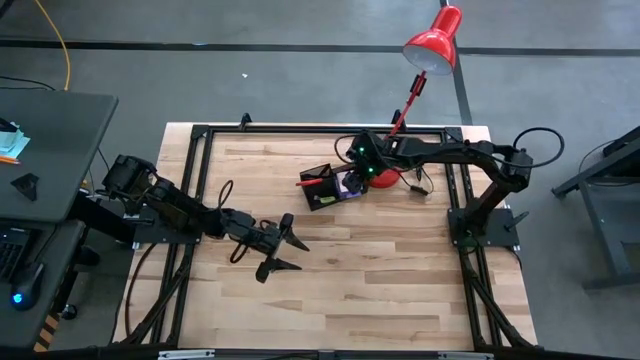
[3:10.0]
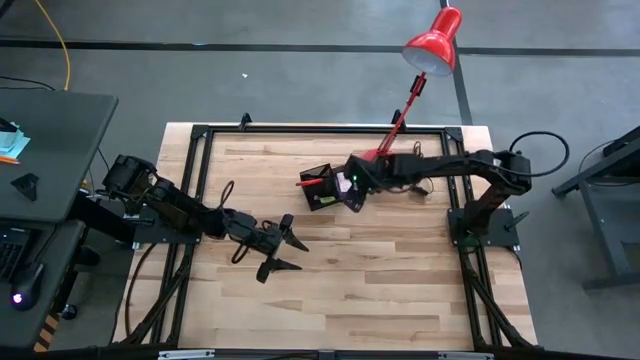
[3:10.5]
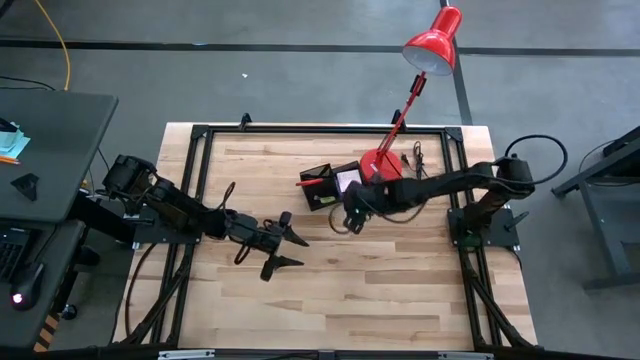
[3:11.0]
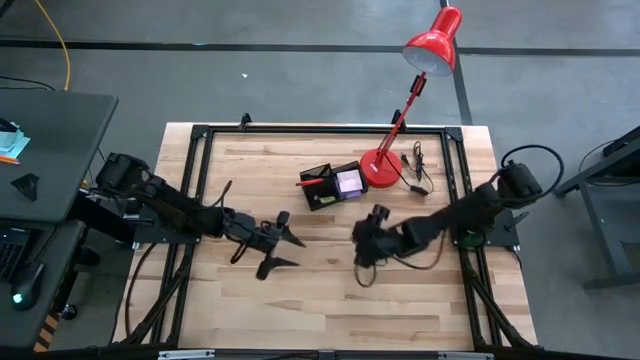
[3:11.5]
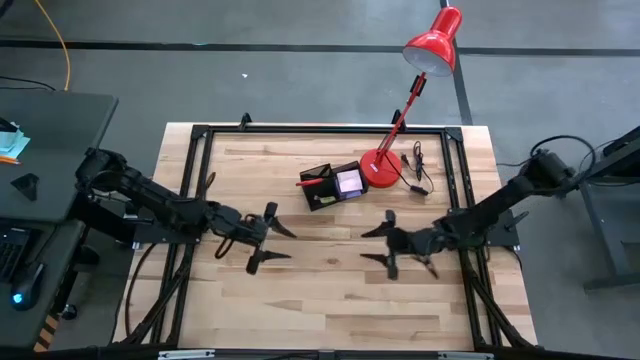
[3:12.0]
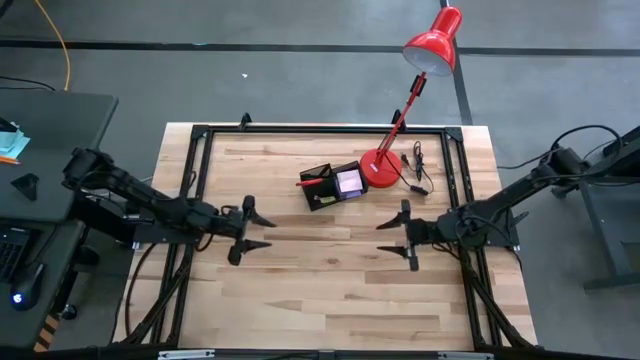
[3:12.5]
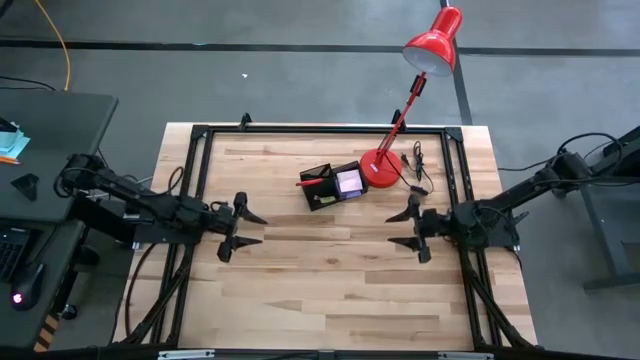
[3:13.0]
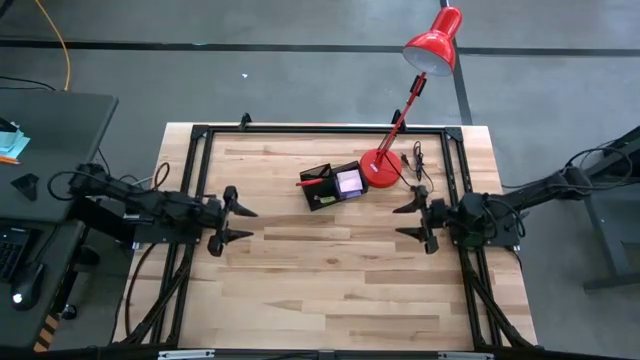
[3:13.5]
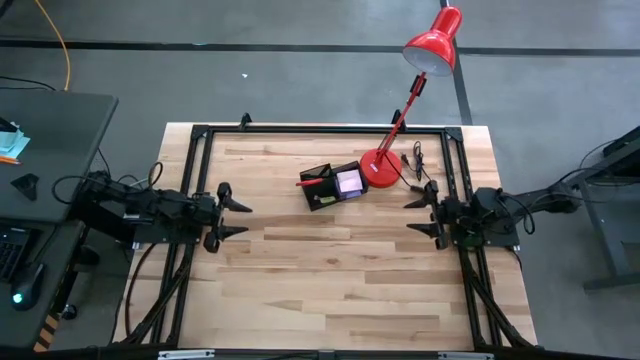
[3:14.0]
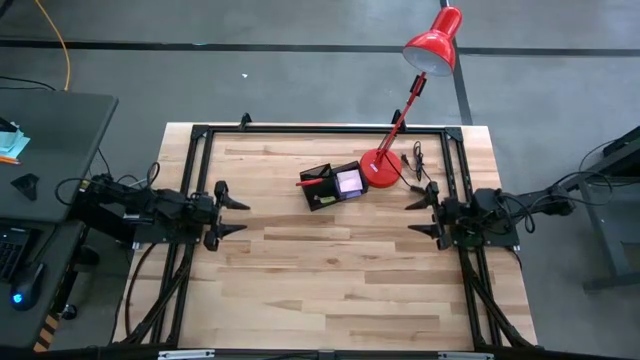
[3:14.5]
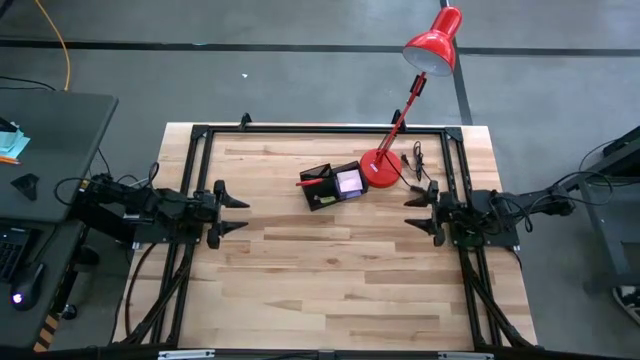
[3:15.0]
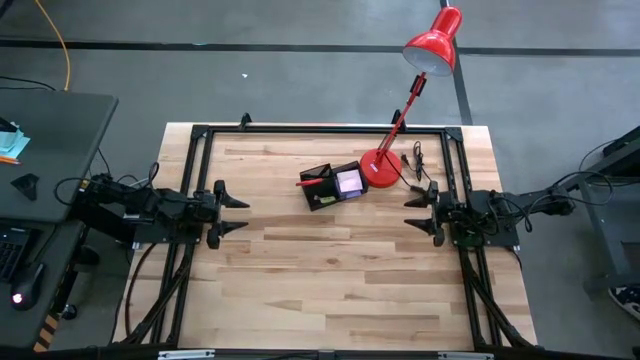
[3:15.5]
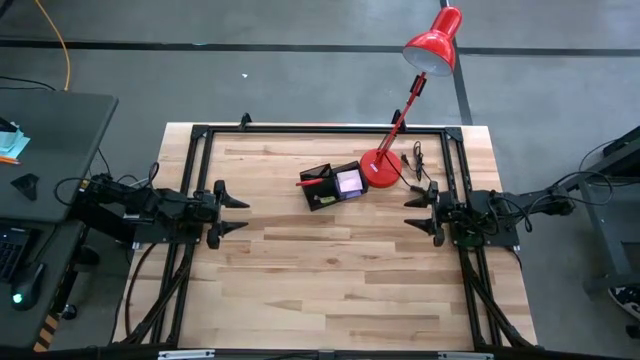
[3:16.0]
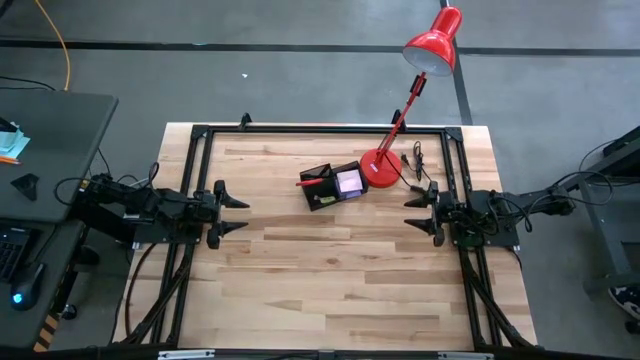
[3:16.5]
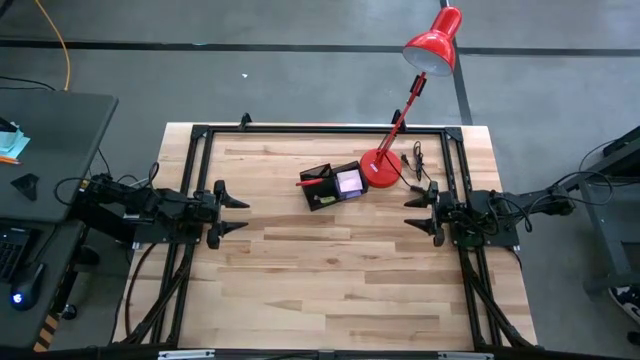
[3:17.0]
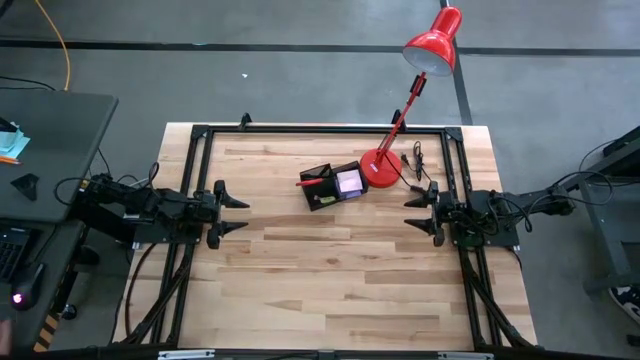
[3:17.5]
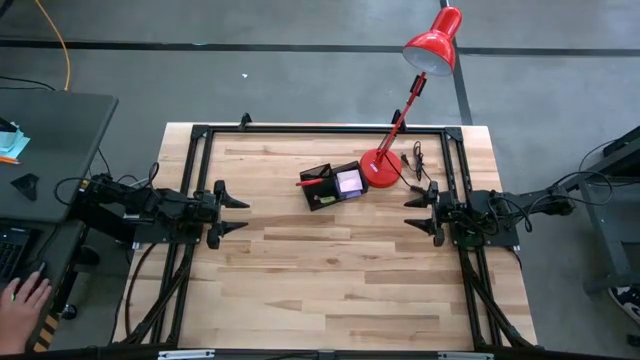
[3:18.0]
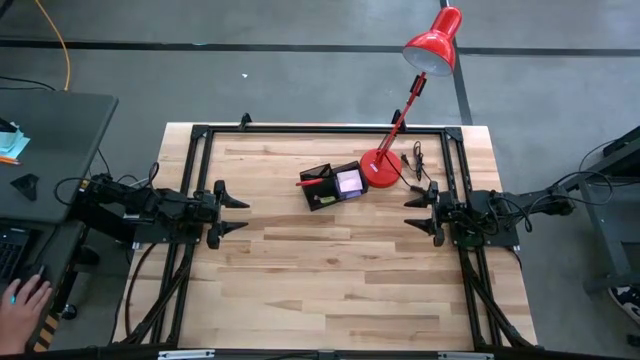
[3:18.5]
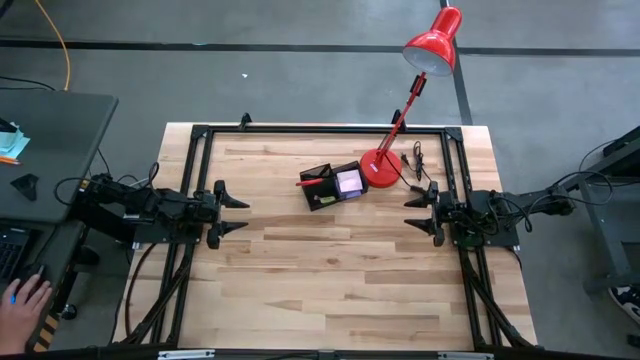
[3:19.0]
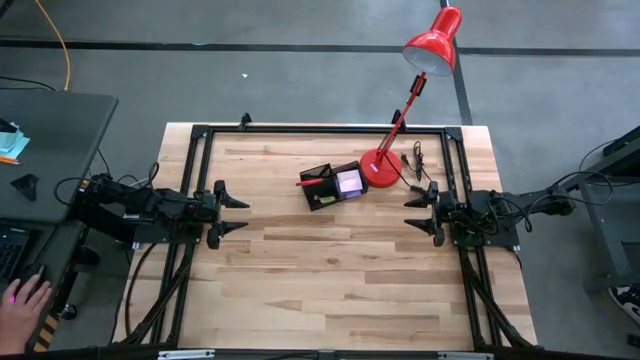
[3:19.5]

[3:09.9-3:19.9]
Task: Pick and place office supplies into organizer
Return to Home Position

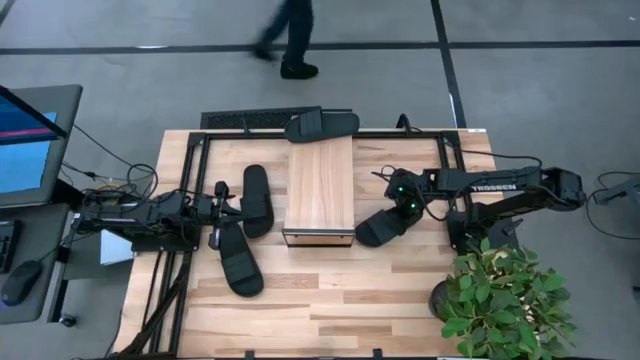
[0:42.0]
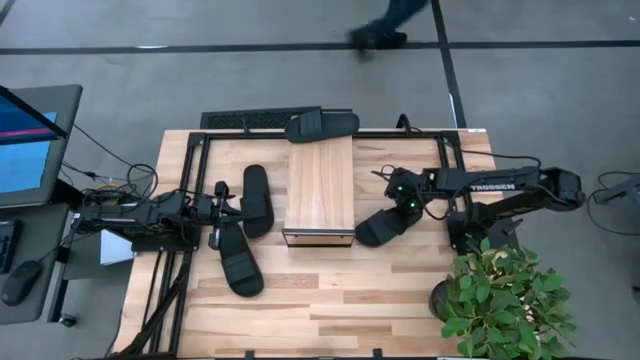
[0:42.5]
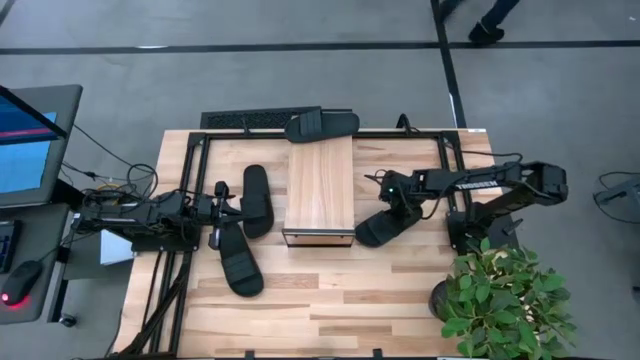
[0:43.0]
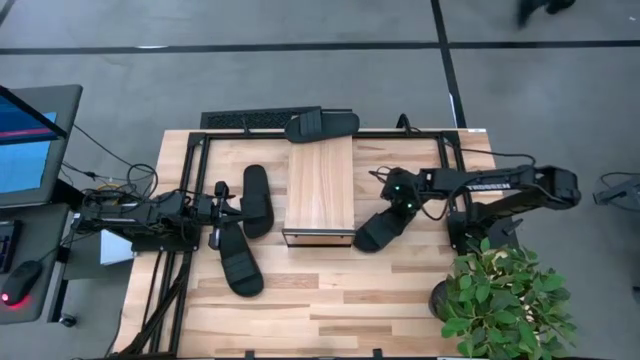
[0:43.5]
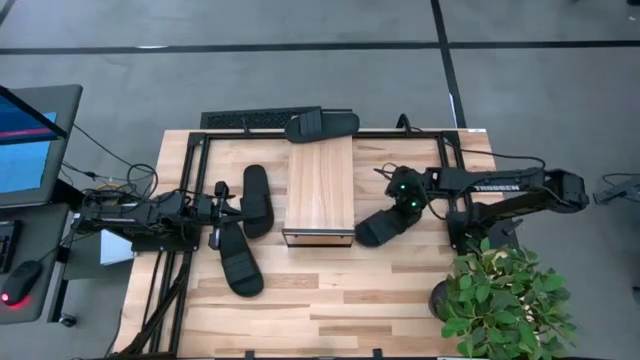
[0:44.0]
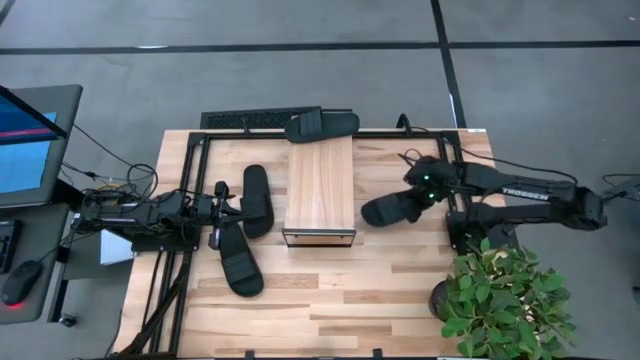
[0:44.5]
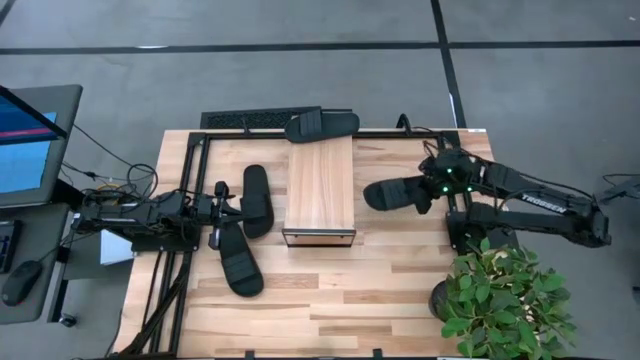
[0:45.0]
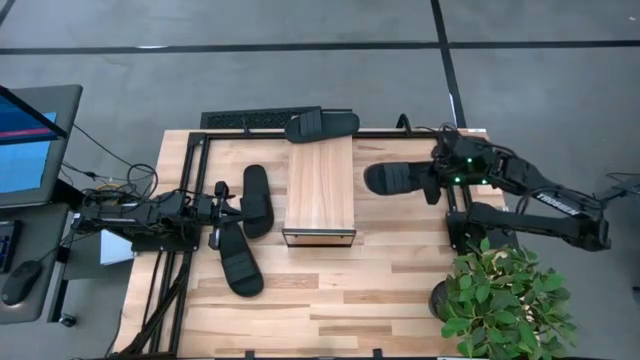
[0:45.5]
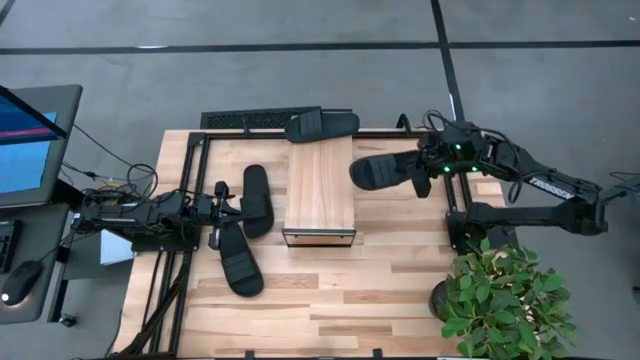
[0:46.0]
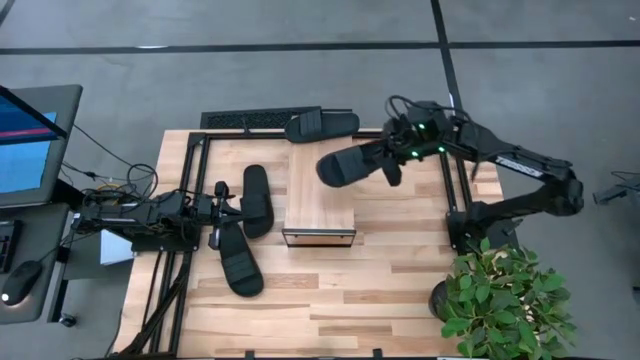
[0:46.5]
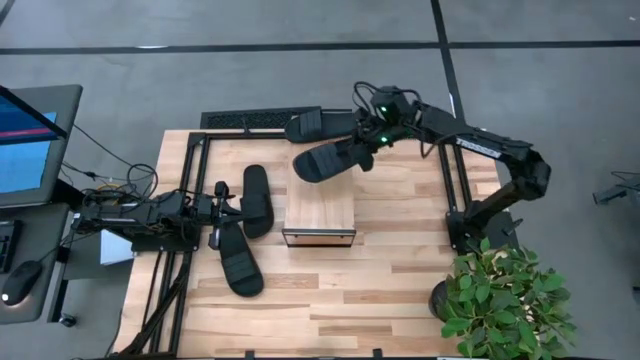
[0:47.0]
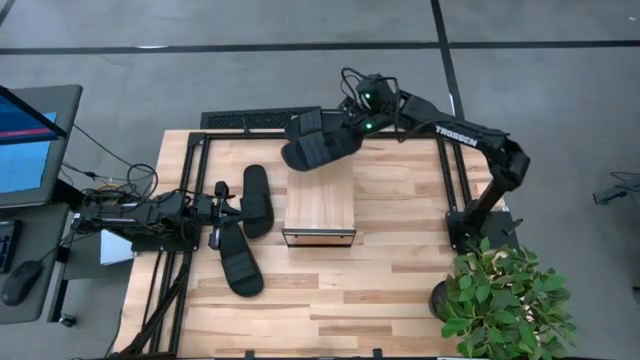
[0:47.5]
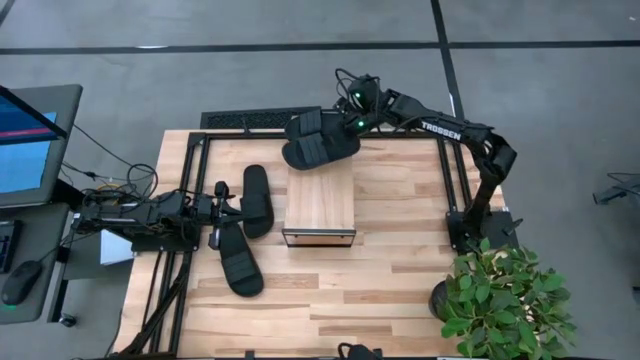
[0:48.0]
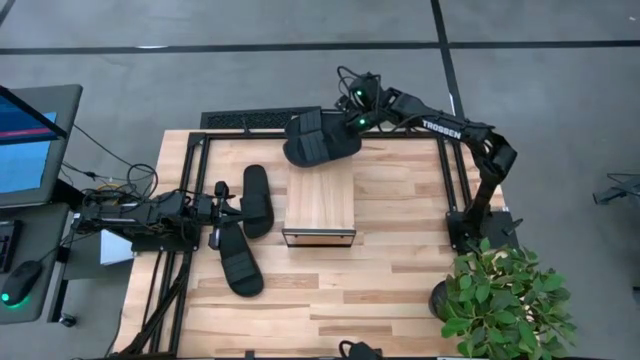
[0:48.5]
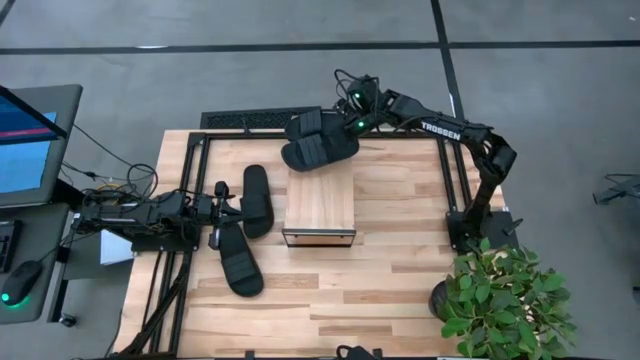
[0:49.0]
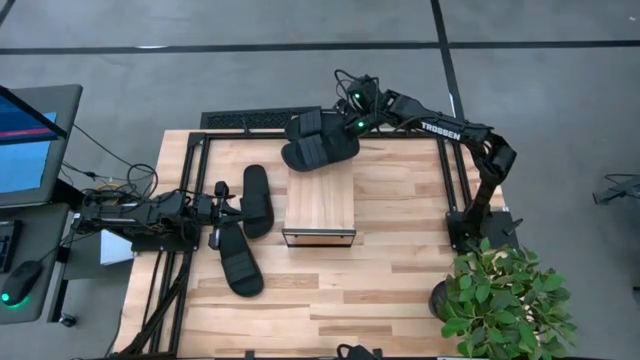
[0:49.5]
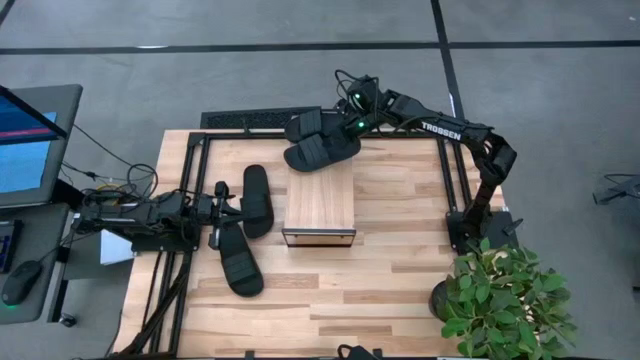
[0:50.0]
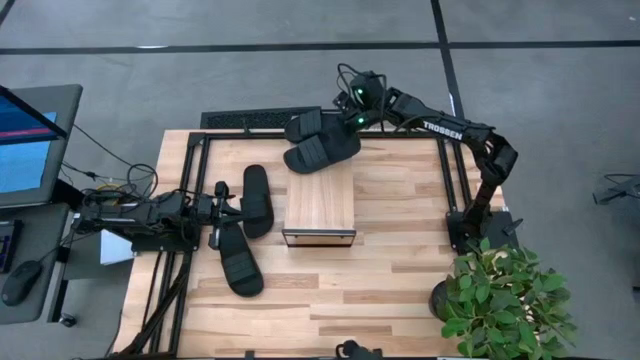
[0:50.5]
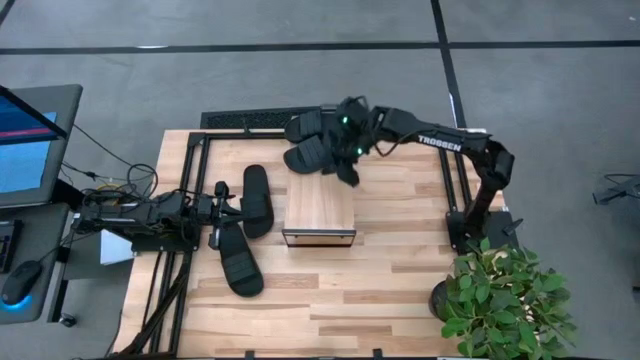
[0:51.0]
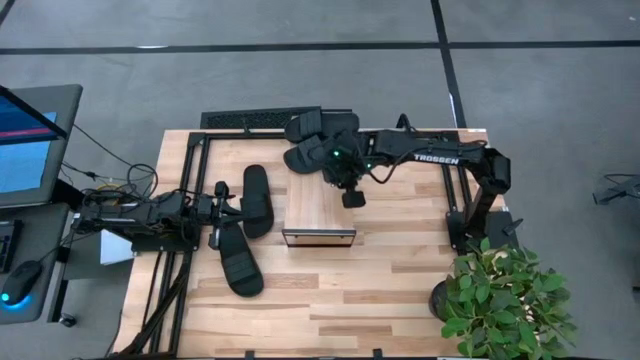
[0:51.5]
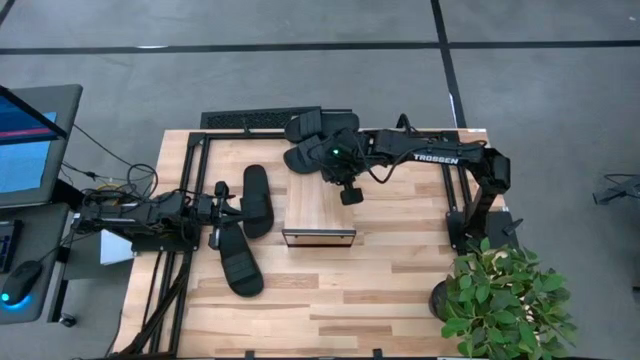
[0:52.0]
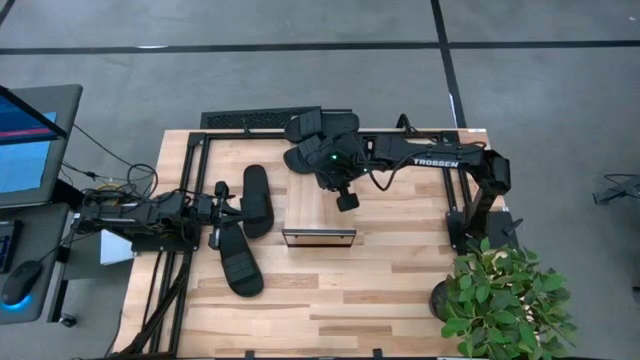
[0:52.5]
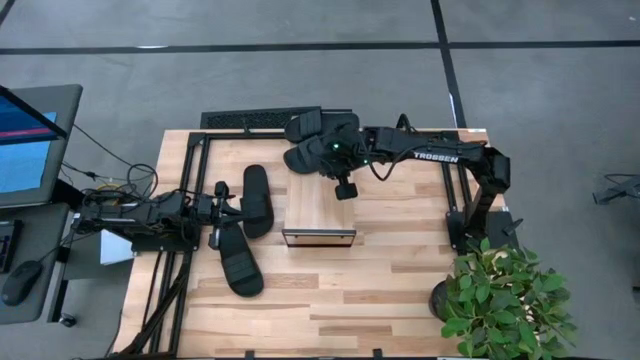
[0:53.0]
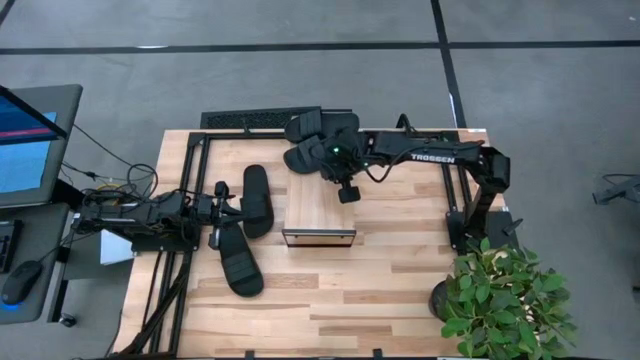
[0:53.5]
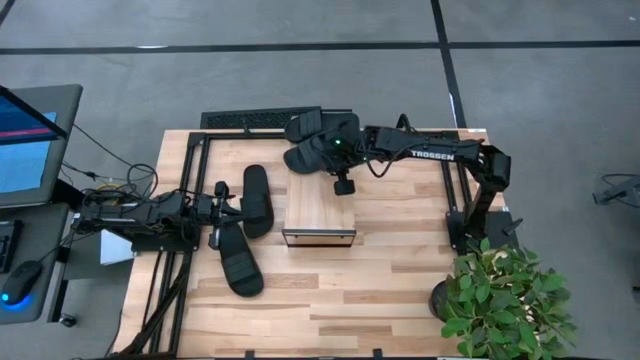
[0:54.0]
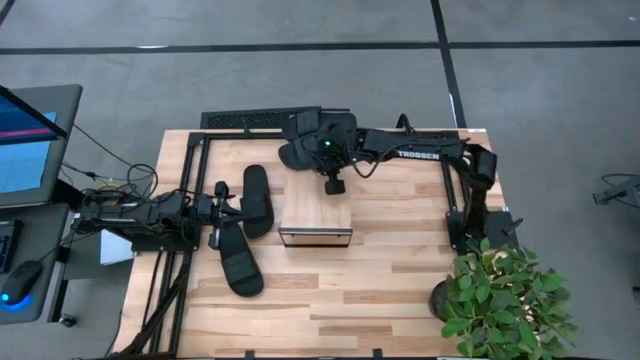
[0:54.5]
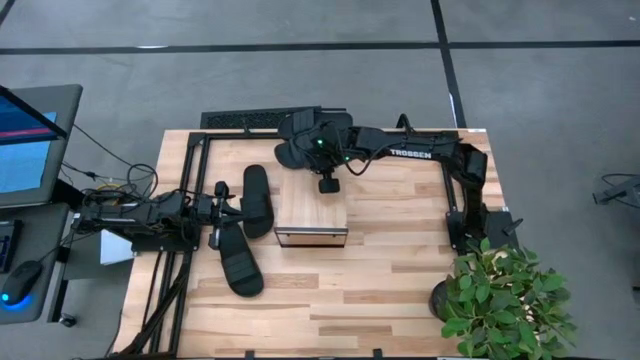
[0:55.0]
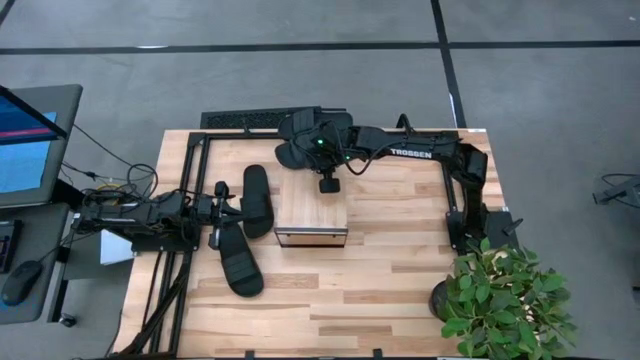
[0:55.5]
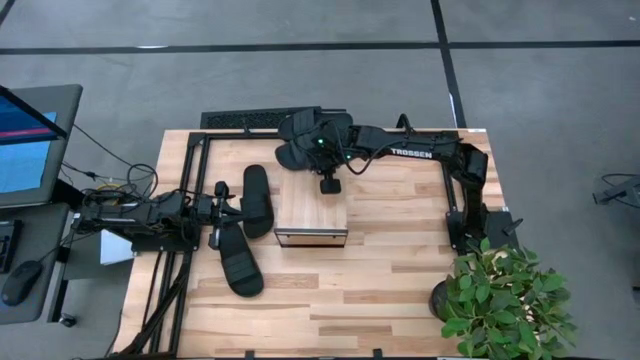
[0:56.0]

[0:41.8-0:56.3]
Task: Pick and place slides into the shelf
Put the black slide on the shelf
